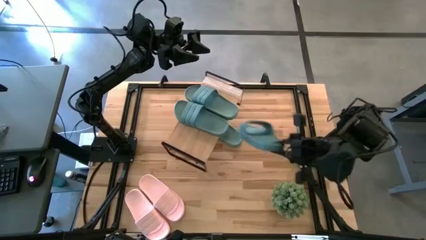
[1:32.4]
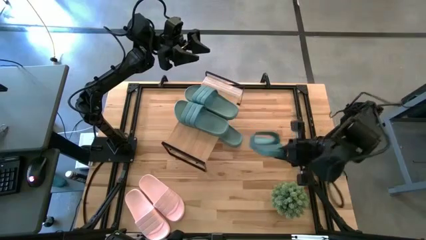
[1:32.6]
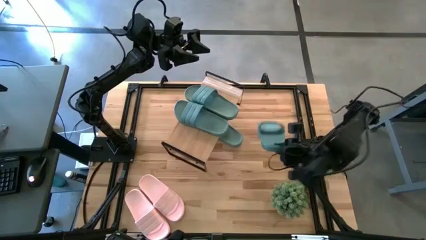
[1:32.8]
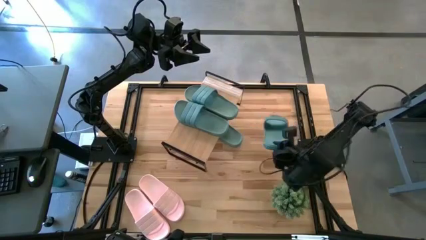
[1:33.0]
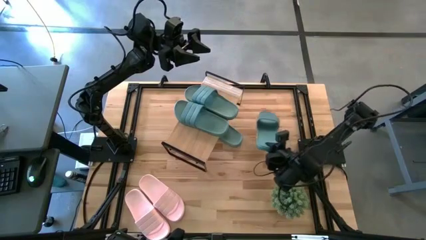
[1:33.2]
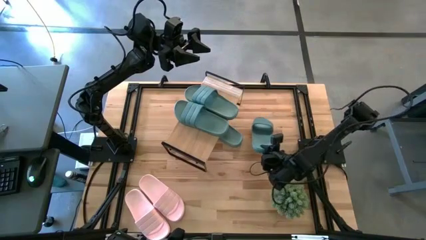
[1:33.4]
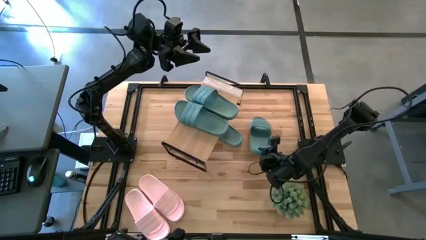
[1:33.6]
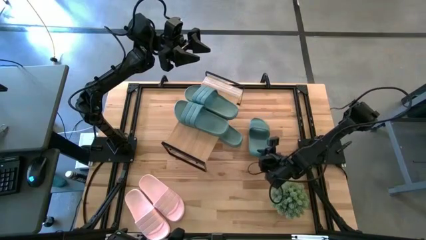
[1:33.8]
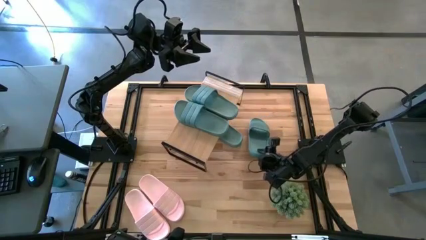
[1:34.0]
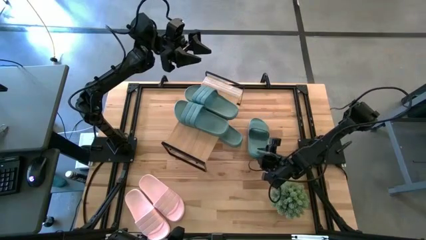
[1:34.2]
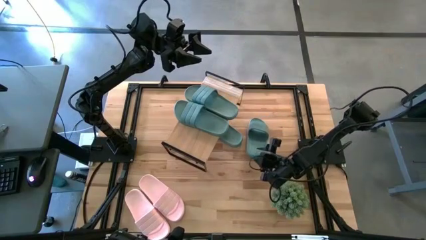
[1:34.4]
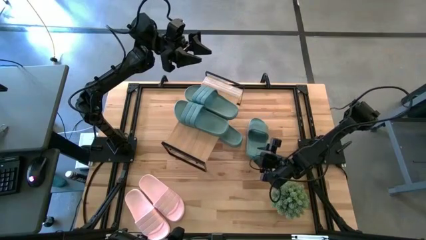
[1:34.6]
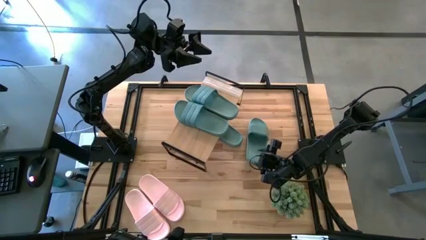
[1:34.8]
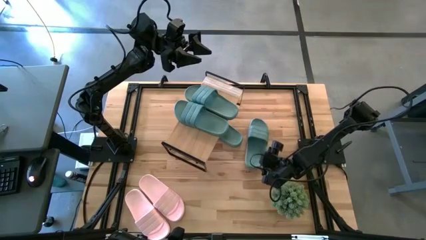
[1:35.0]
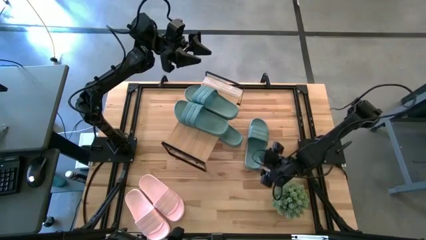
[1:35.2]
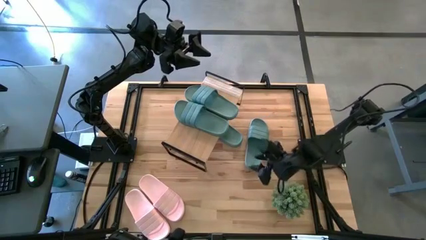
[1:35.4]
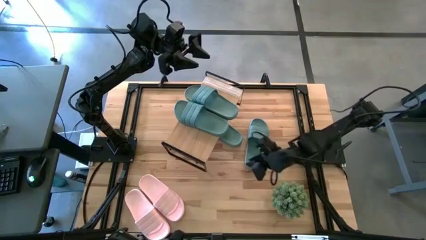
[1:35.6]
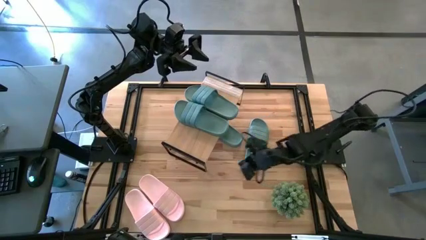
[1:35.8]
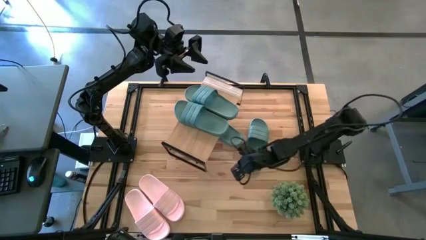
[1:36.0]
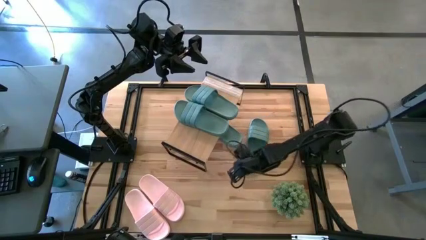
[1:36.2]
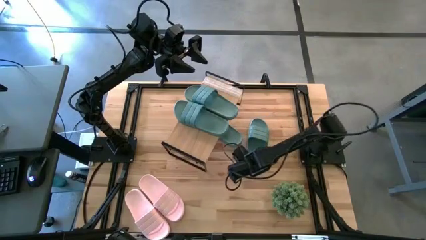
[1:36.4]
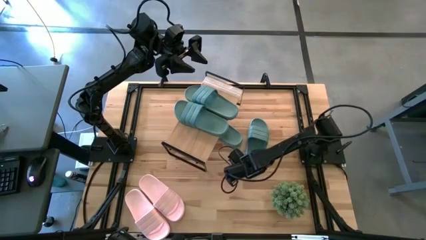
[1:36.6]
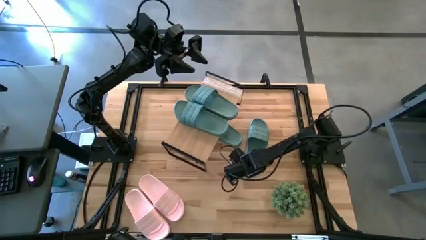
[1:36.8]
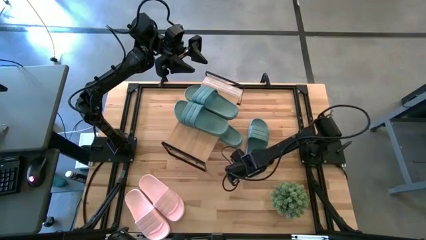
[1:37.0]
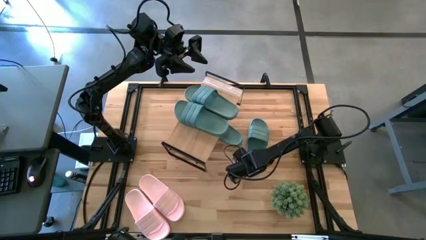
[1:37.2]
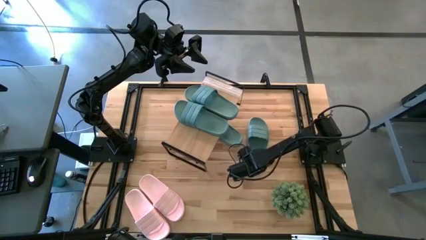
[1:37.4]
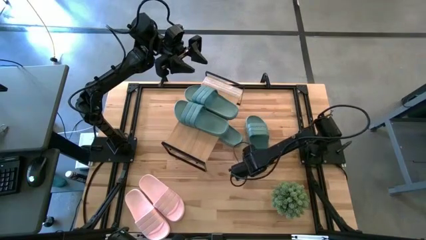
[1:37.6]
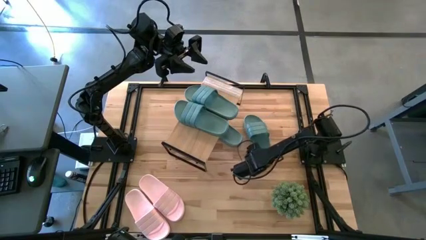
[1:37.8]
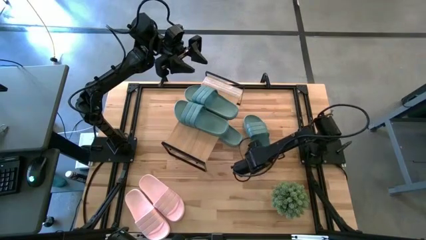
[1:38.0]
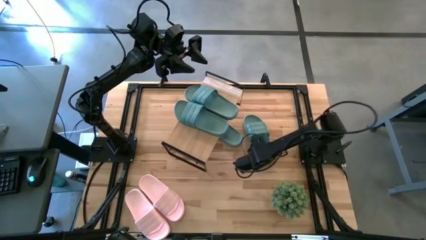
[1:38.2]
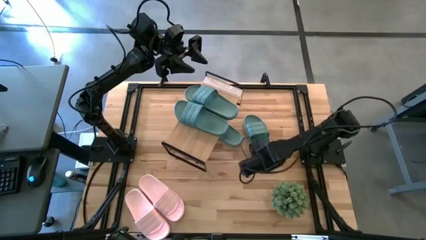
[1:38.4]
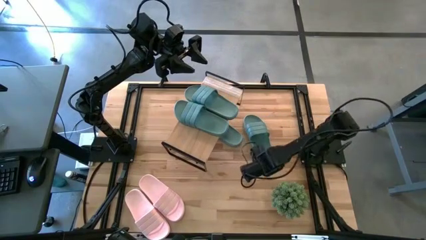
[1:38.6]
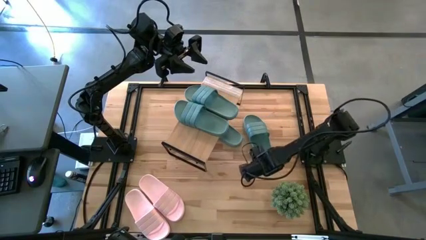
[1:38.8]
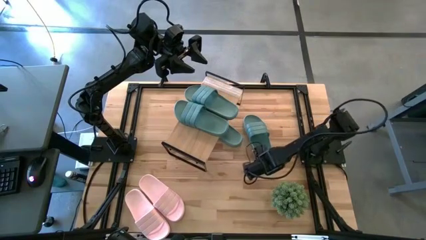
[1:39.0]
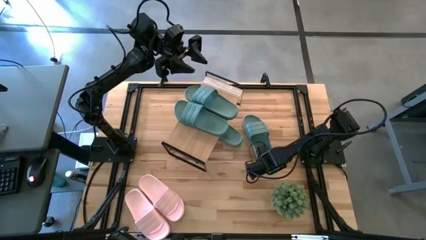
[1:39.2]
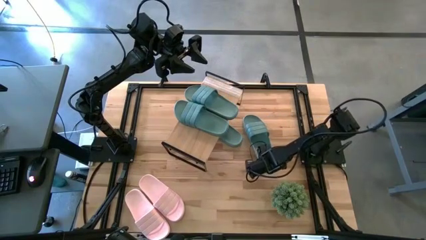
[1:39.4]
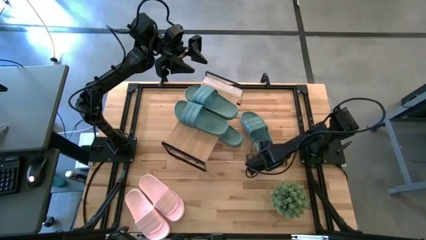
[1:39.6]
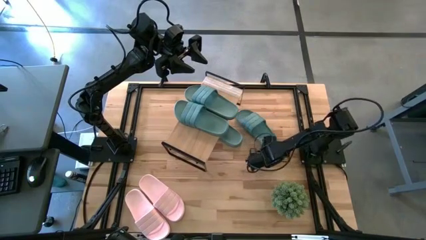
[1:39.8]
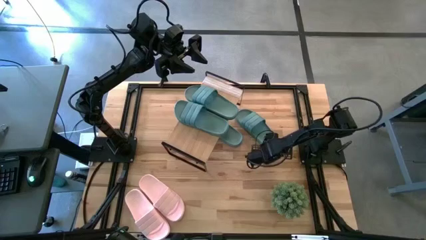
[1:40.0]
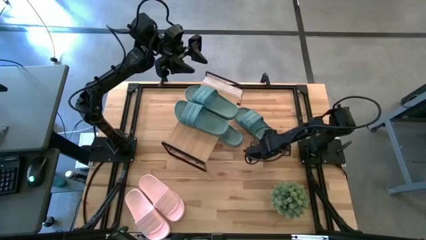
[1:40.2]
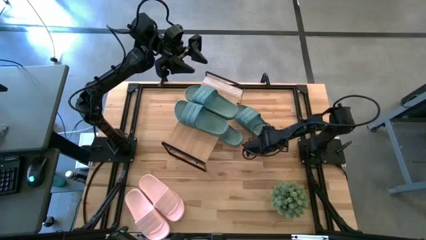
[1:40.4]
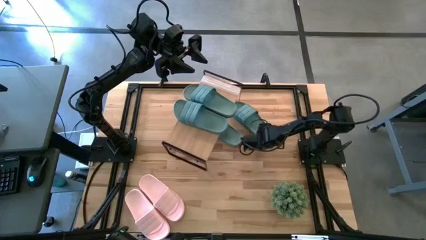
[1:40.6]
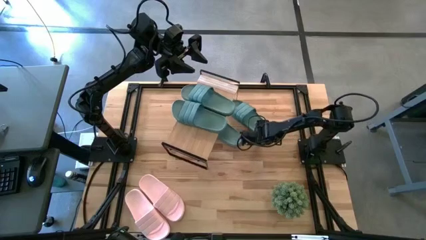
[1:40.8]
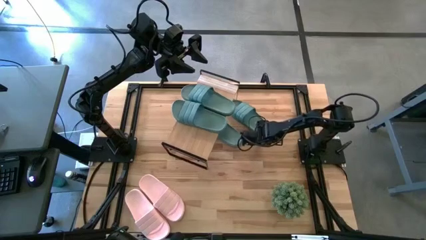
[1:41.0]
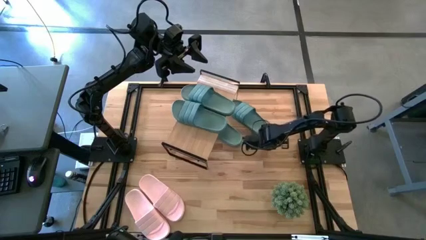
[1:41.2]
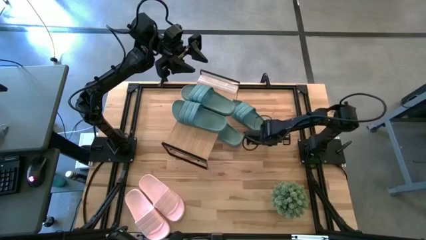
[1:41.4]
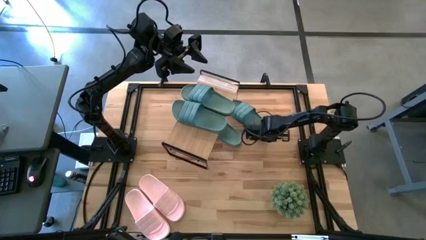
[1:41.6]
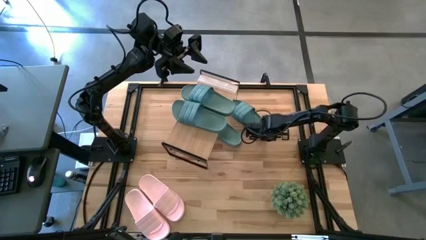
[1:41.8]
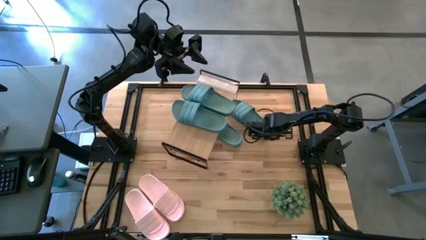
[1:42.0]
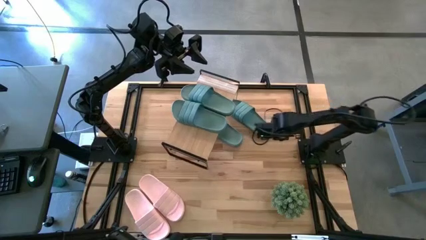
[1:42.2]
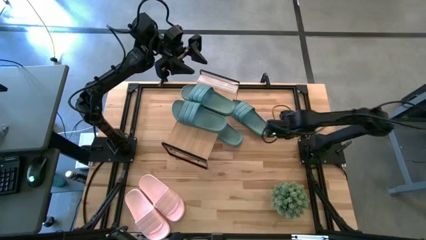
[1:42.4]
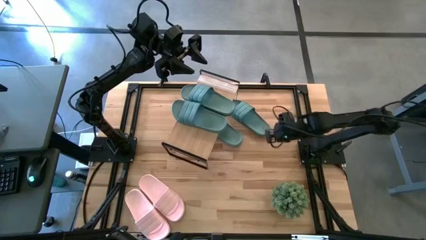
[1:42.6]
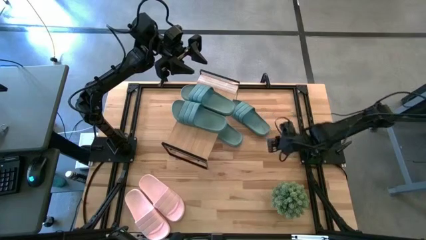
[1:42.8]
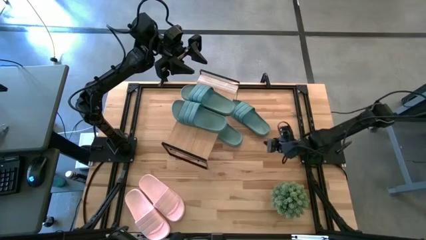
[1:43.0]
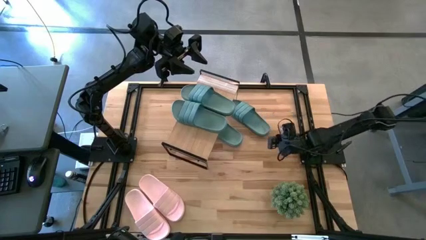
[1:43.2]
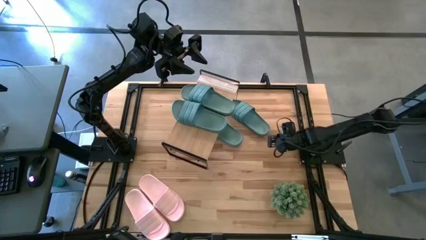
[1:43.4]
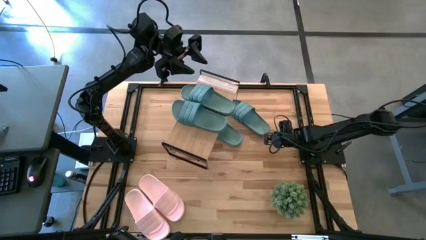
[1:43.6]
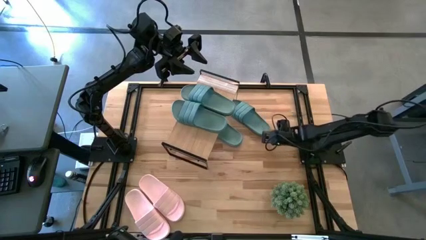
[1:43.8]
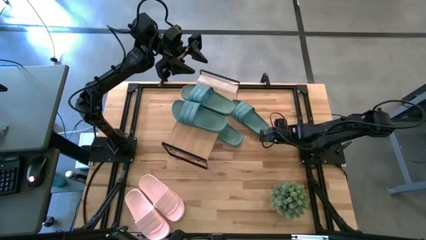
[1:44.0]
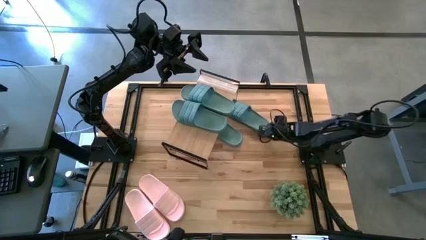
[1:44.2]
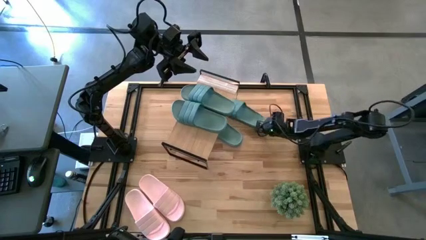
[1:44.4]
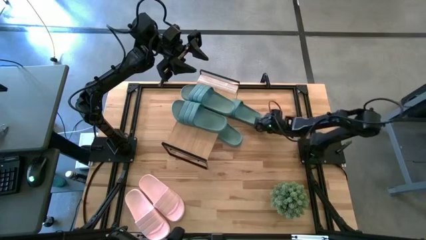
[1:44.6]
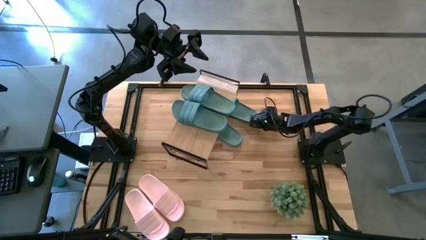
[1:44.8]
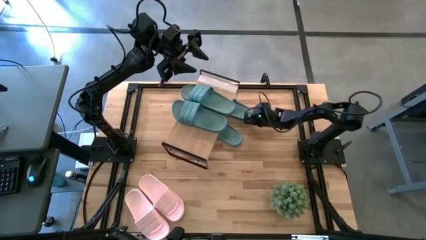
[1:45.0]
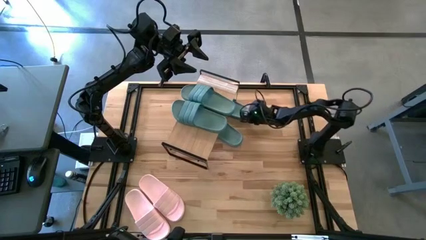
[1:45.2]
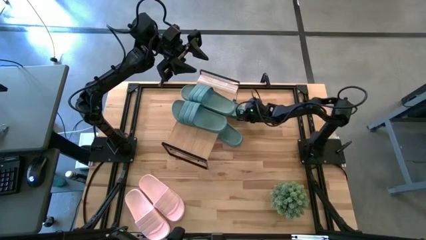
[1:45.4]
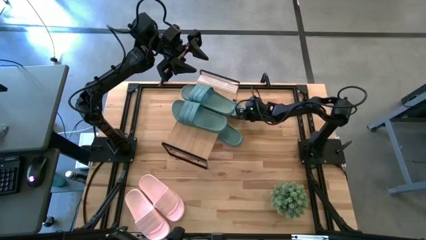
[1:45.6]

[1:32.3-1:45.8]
Task: Pick and place slides into the shelf
Put the green slide under the shelf

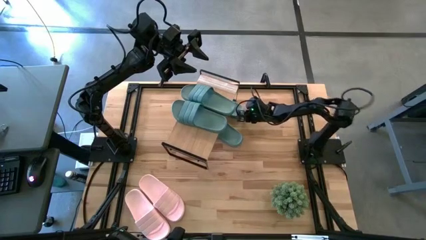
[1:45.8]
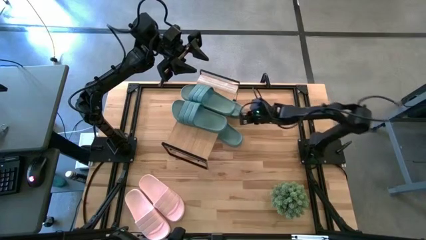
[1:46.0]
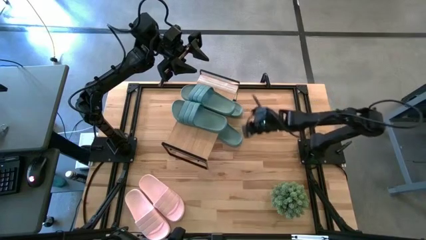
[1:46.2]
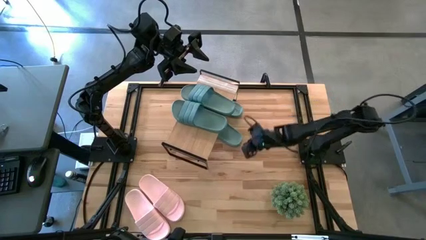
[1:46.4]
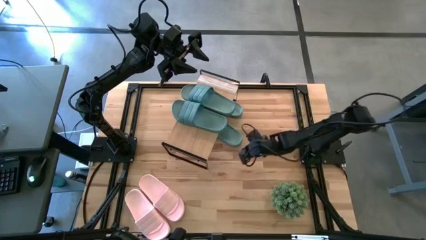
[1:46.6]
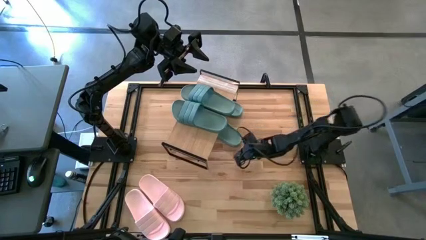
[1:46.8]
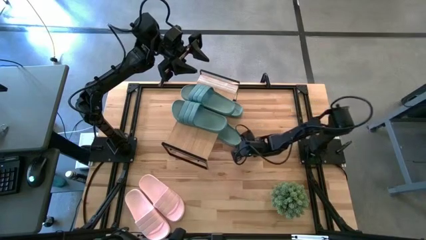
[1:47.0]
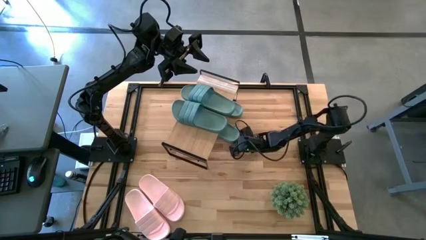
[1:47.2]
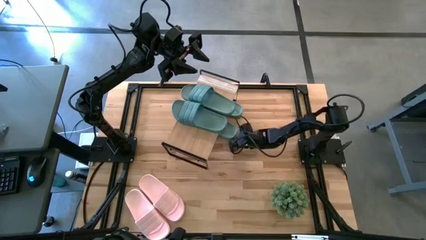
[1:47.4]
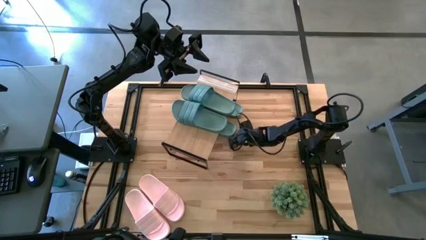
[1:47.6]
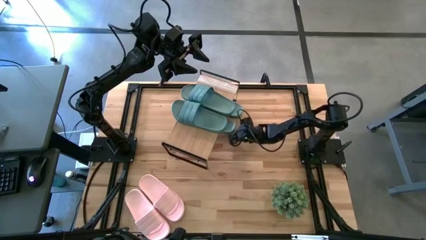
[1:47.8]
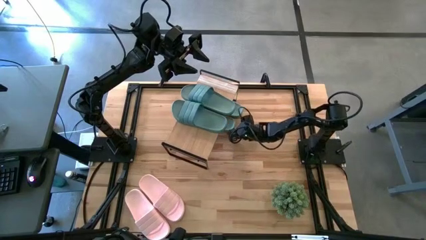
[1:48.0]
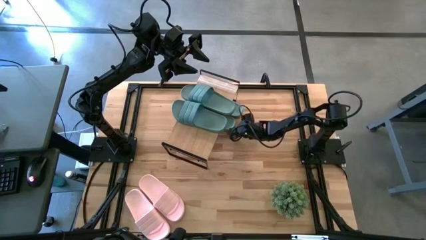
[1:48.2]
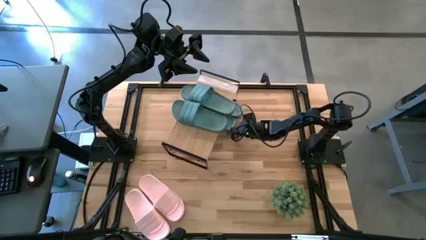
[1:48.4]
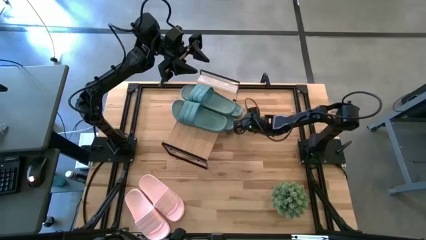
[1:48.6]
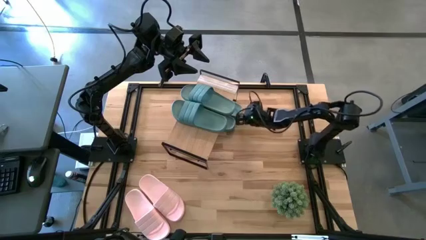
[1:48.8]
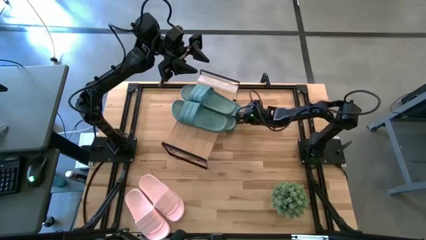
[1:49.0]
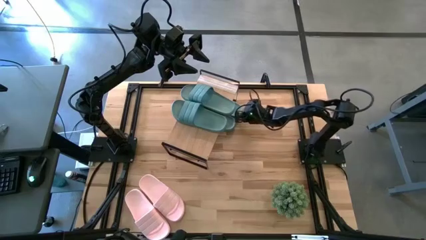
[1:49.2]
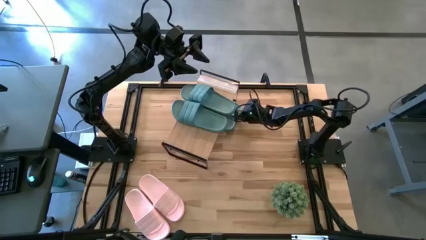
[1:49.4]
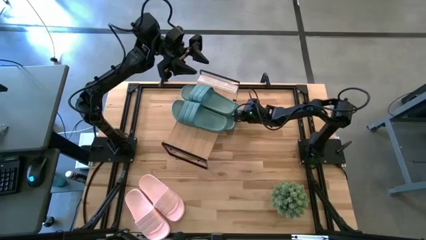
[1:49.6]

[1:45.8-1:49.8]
Adjust the left green slide under the shelf
